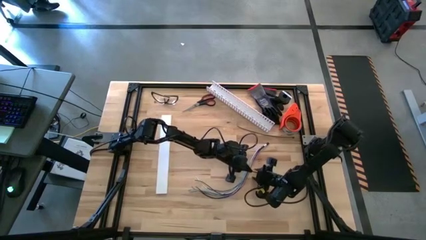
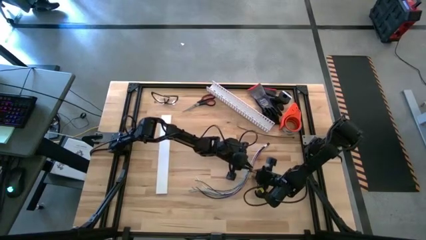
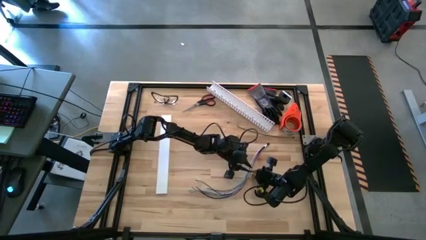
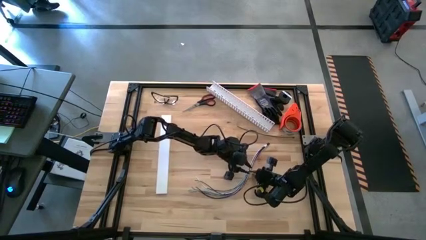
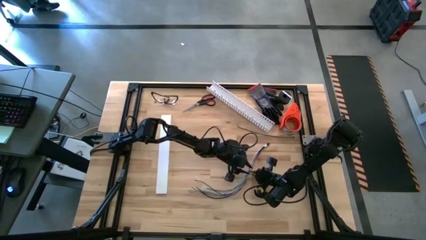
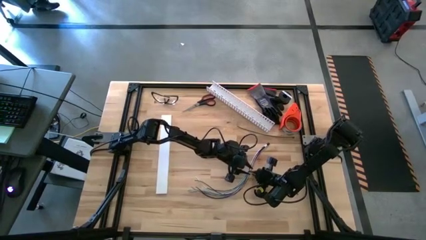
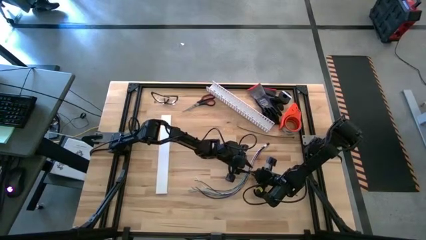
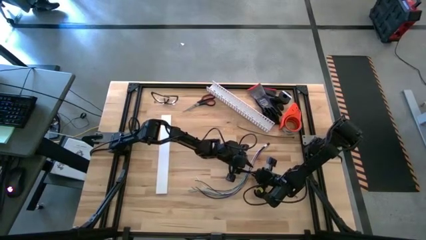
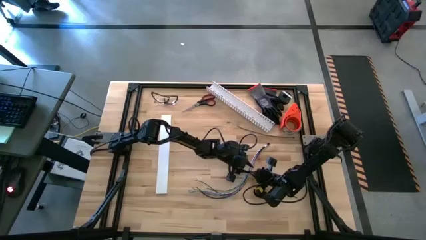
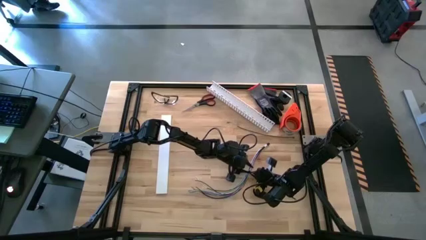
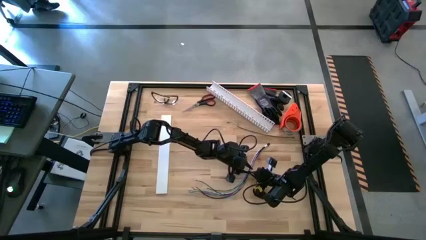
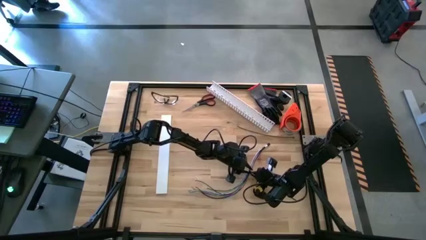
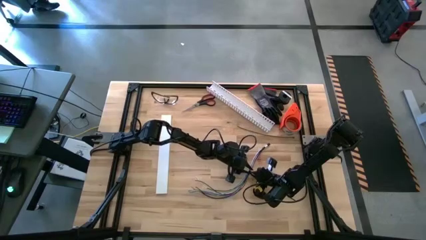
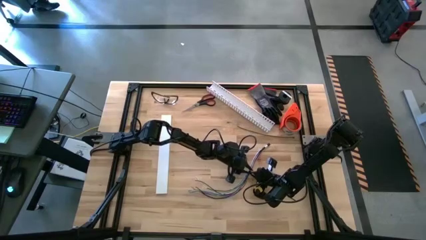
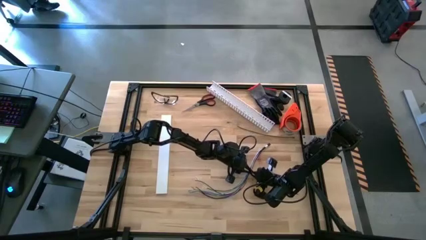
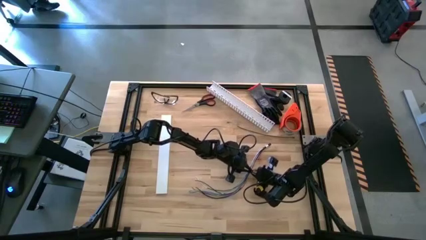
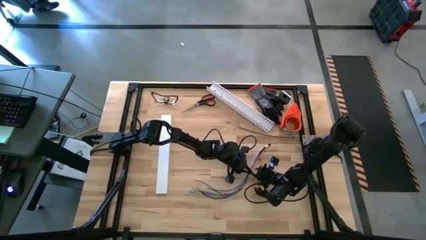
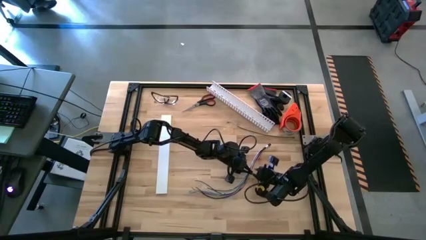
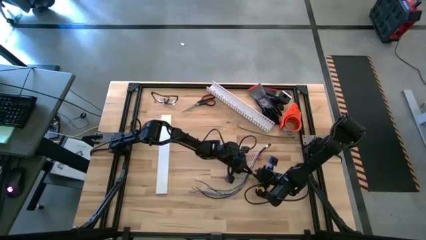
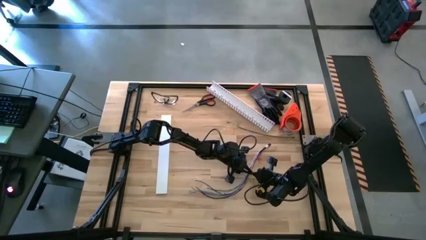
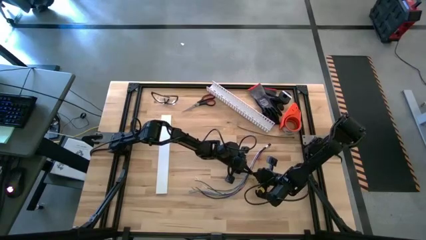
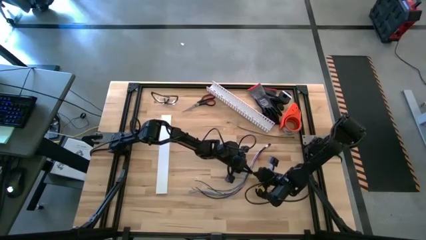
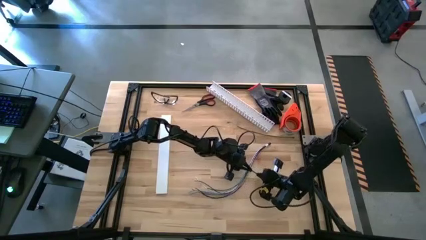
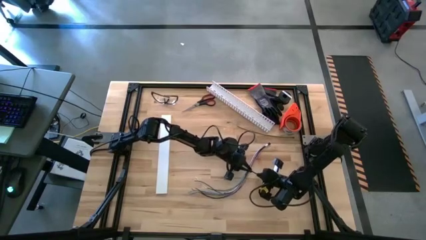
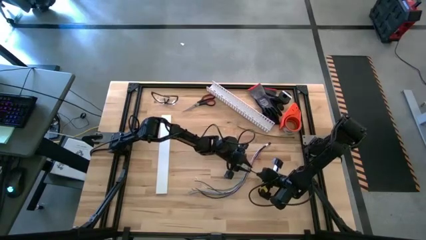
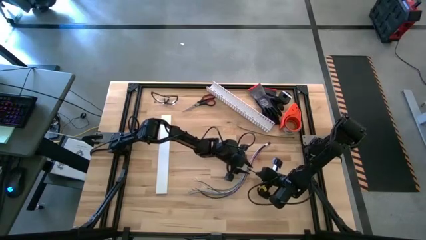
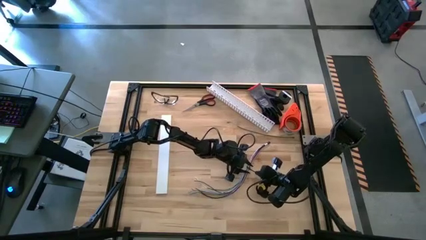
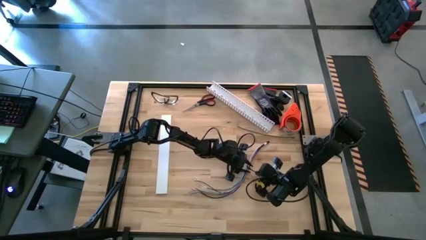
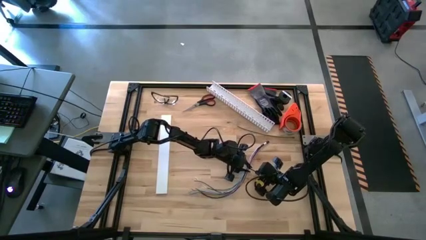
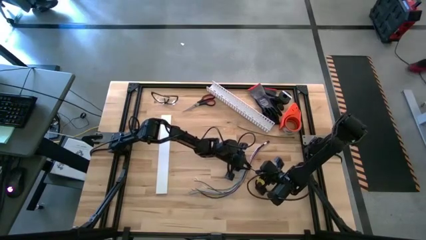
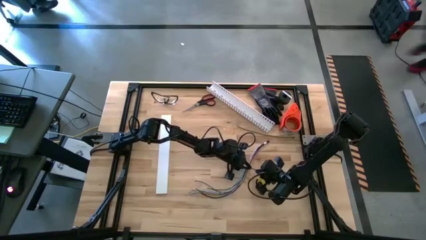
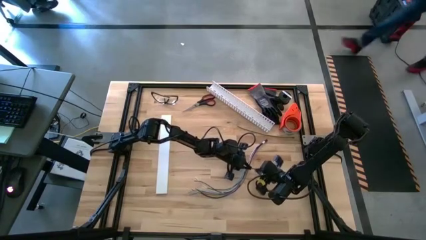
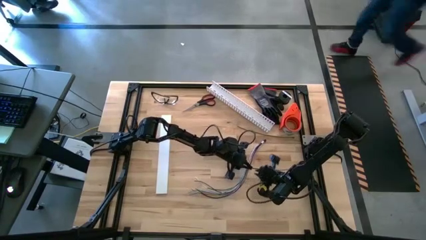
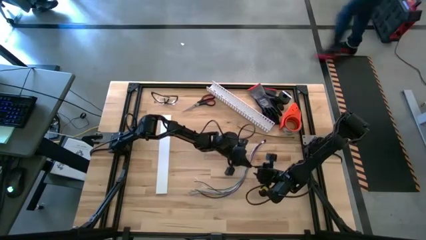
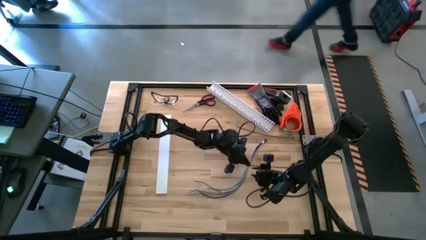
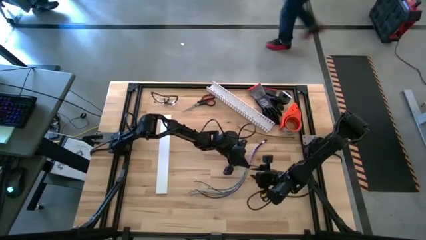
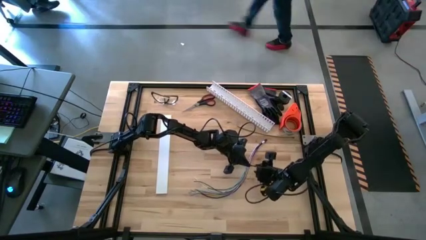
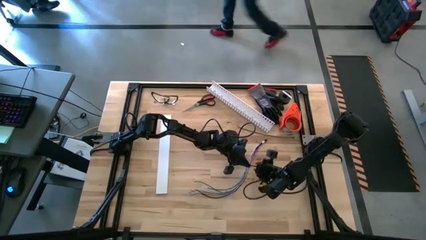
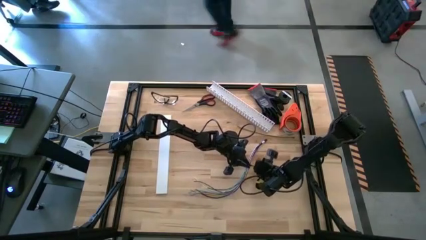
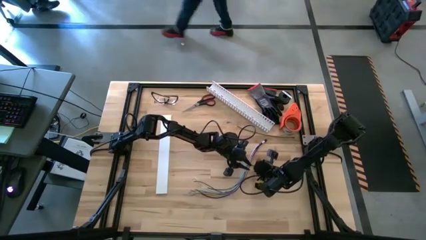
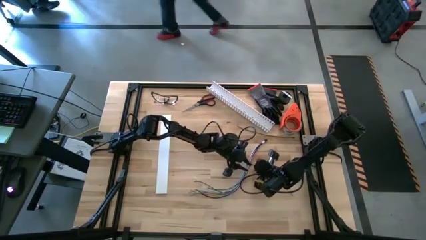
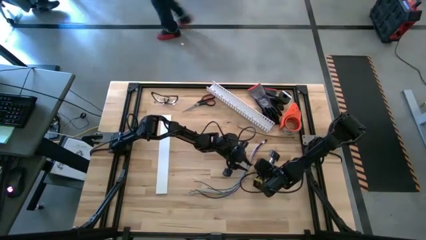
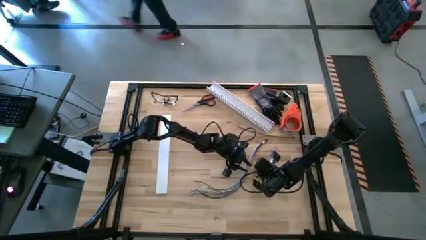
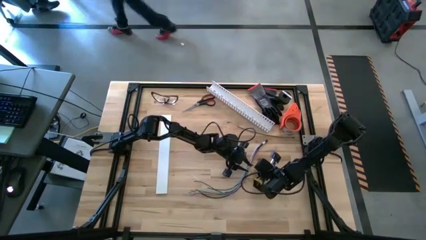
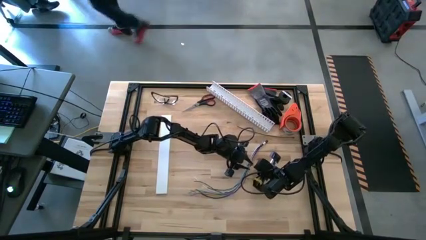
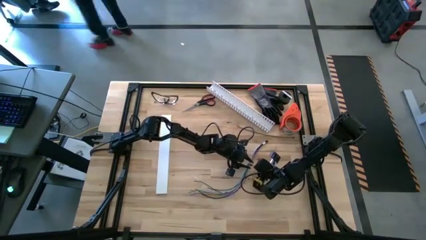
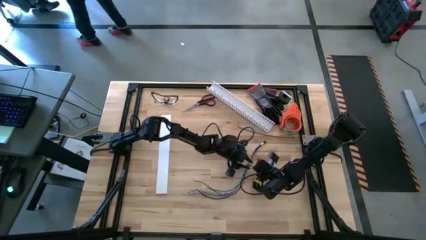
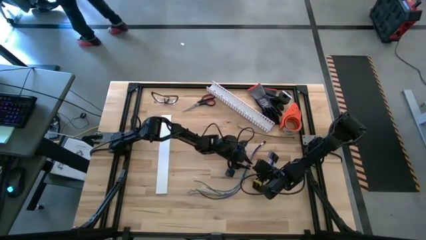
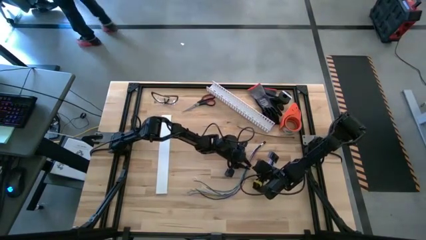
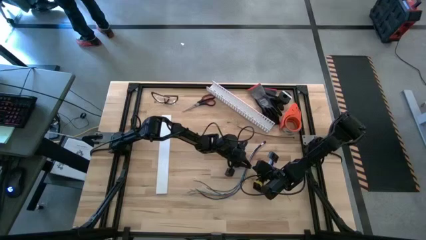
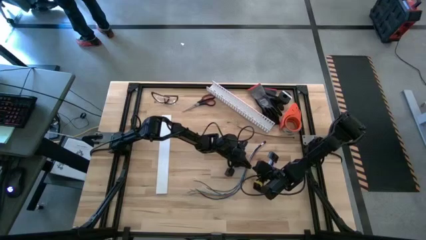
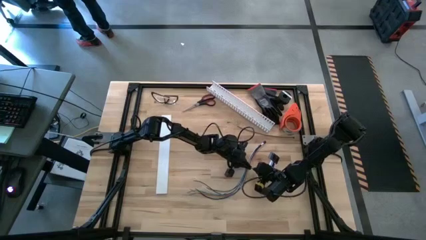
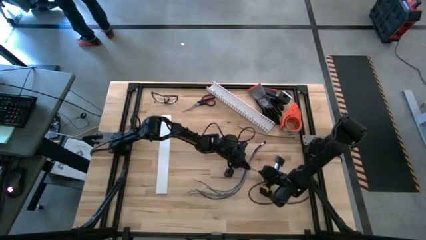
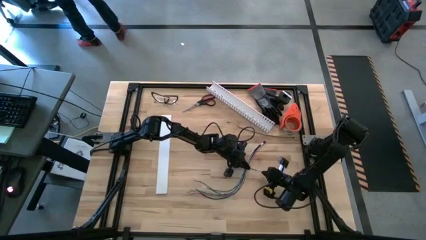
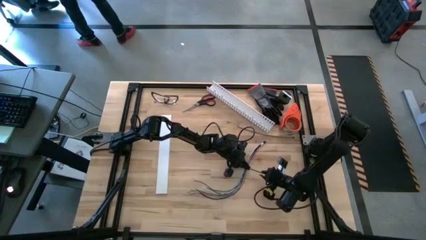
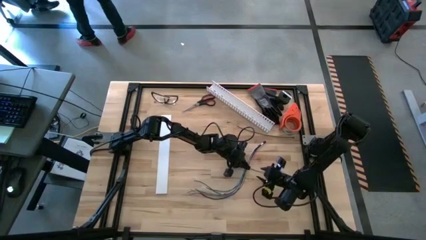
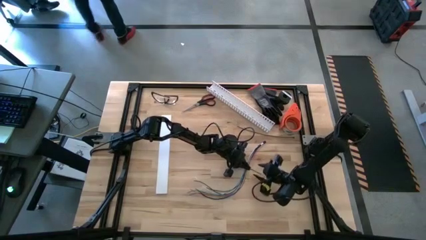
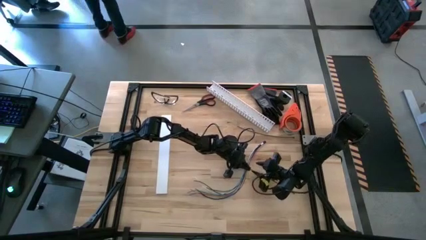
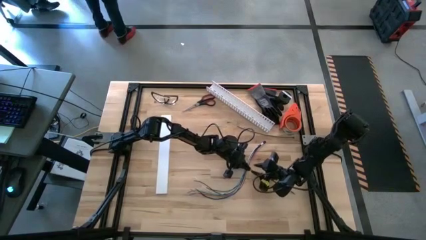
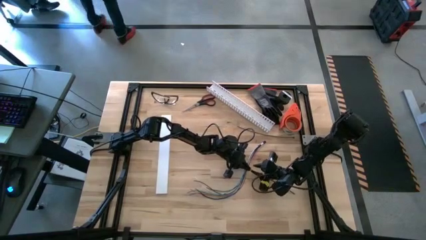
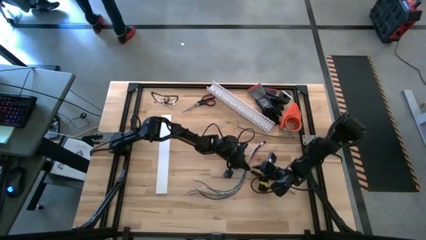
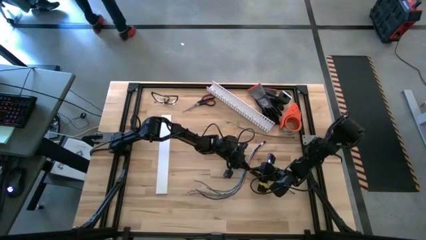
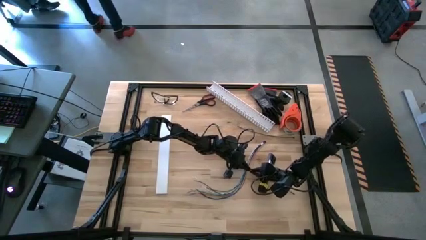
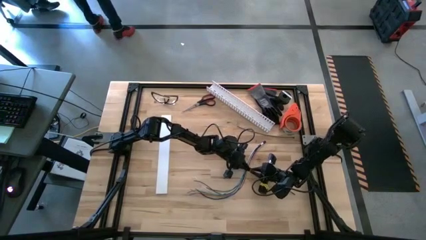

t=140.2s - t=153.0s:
Task: Ziptie cables
Wrap the bottom black zip tie on the cable wires

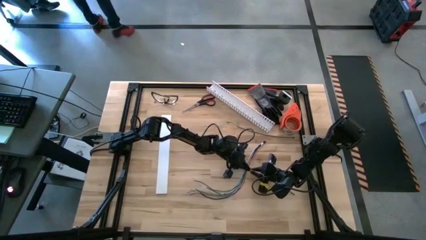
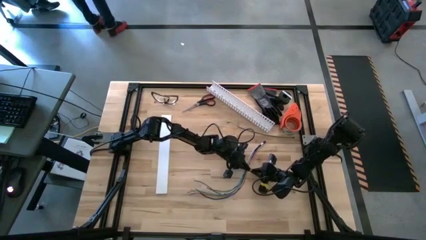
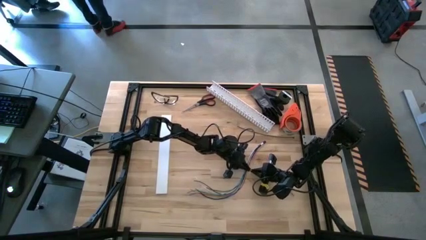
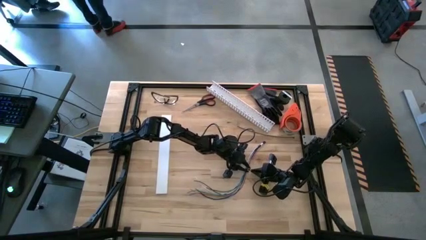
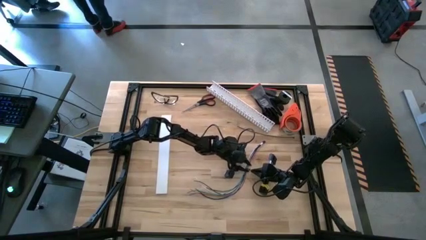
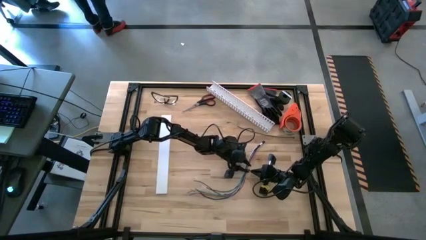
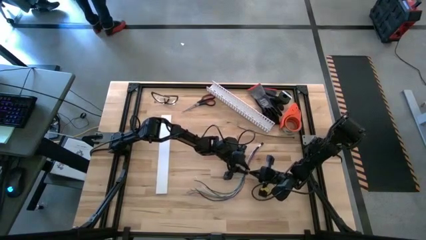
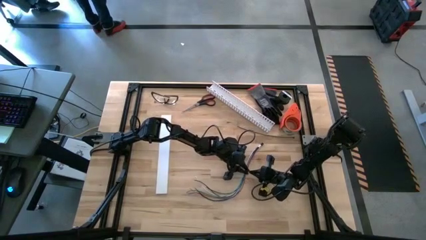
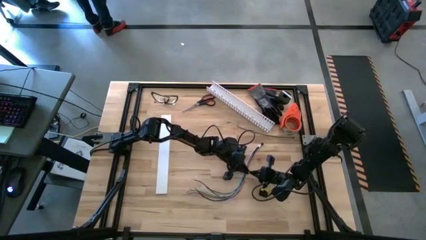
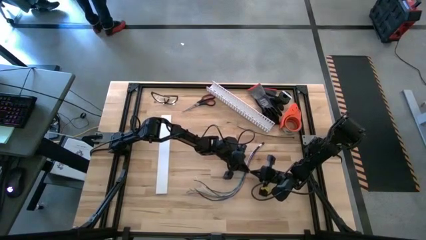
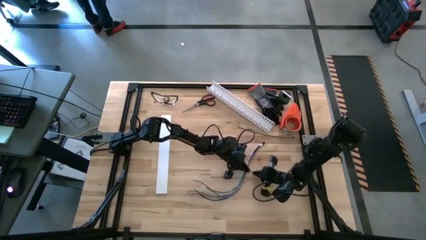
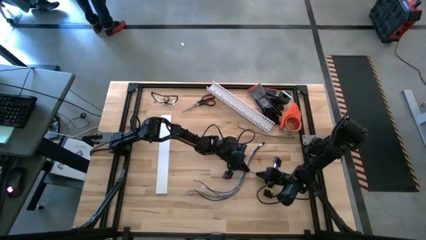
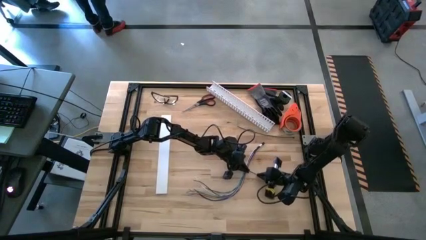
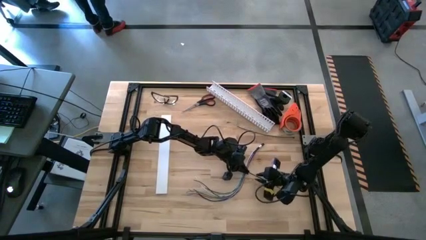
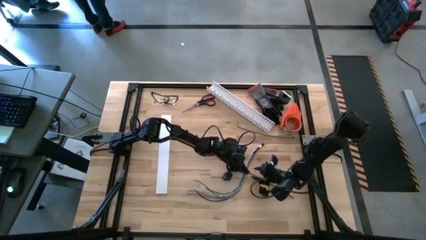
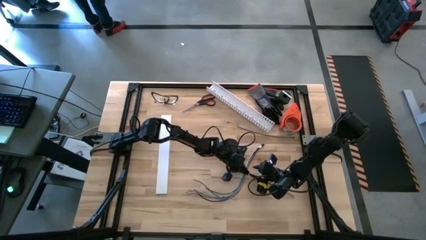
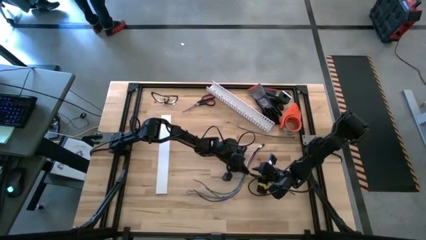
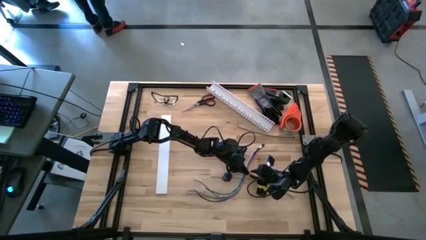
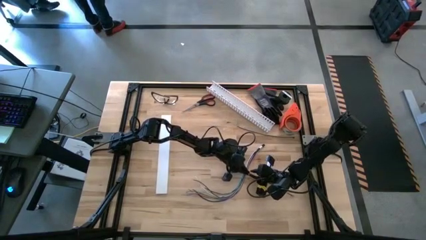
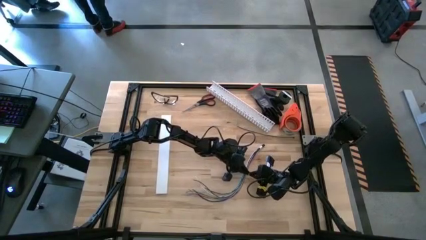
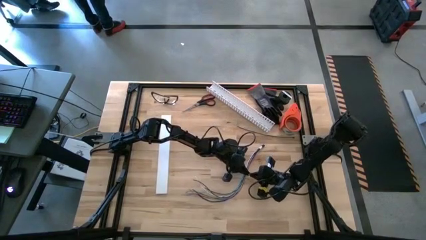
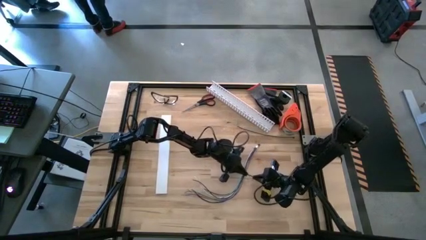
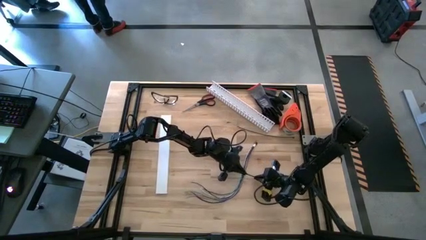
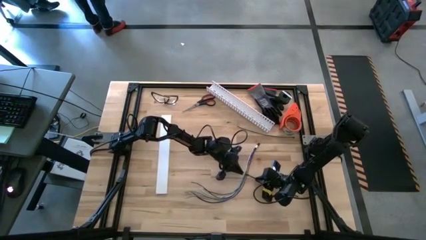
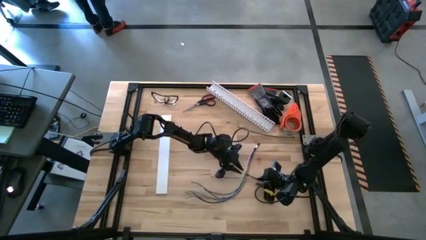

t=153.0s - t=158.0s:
Wrap the bottom black zip tie on the cable wires
